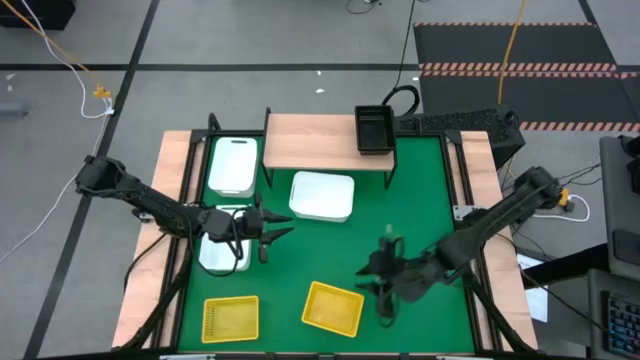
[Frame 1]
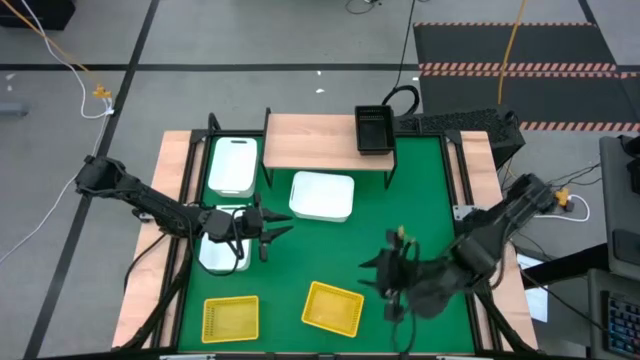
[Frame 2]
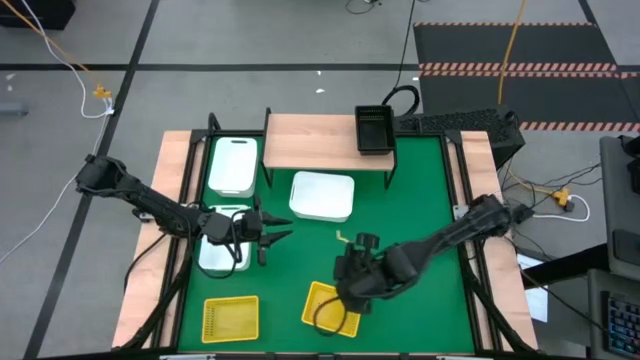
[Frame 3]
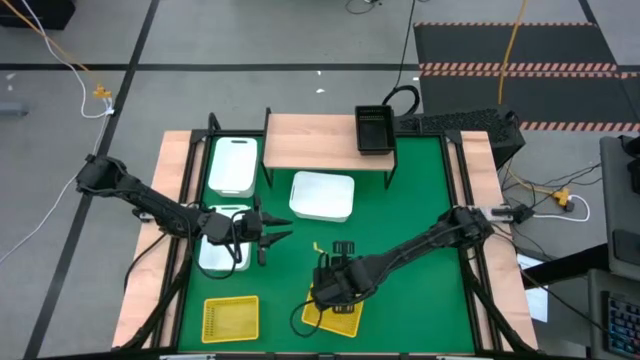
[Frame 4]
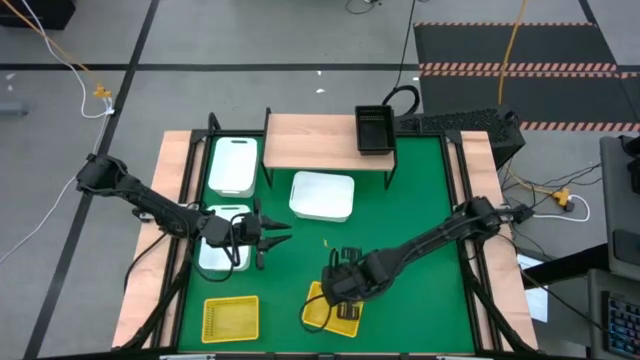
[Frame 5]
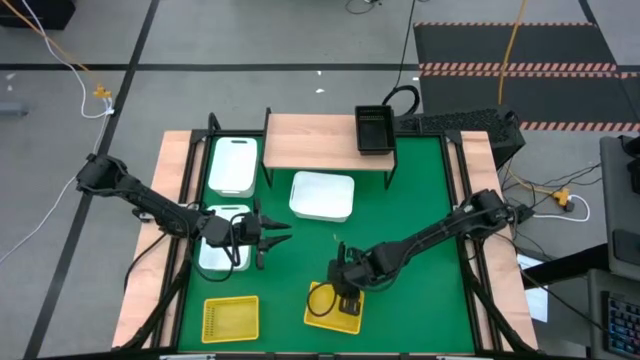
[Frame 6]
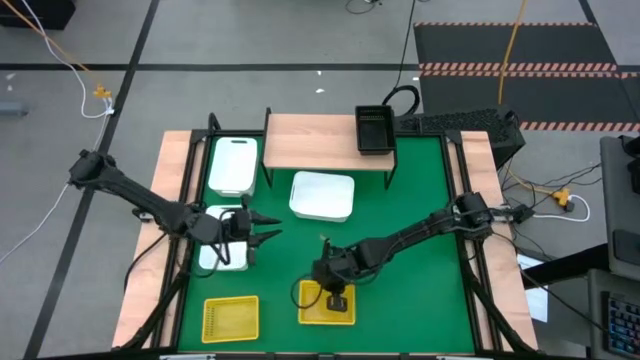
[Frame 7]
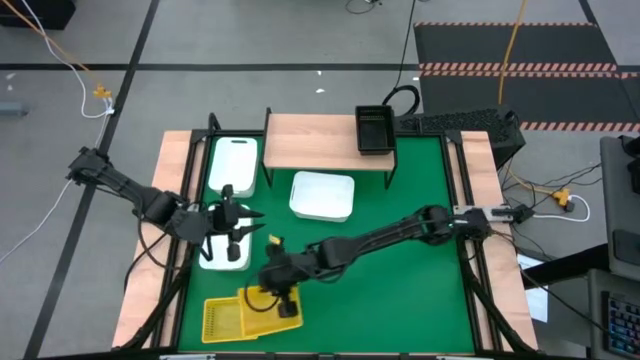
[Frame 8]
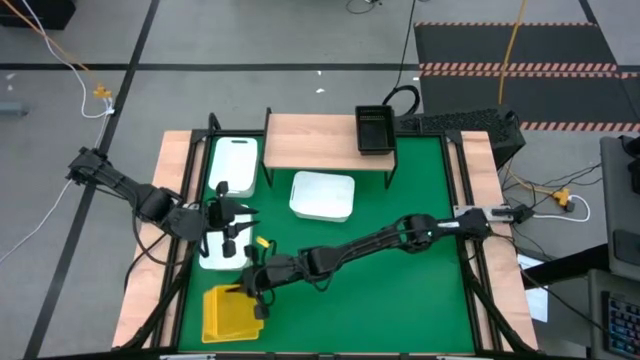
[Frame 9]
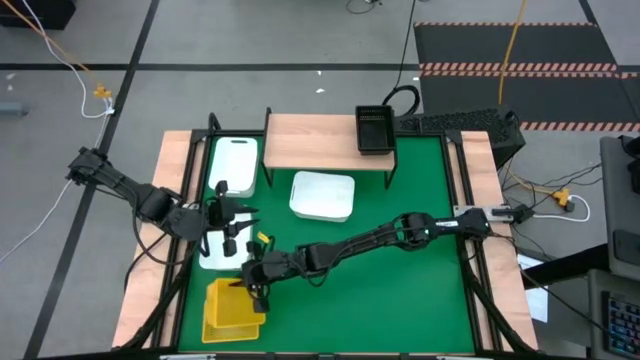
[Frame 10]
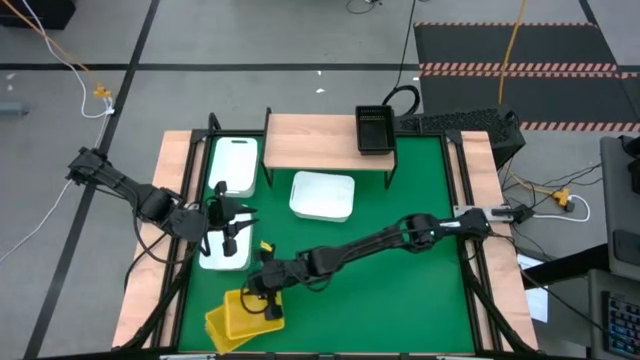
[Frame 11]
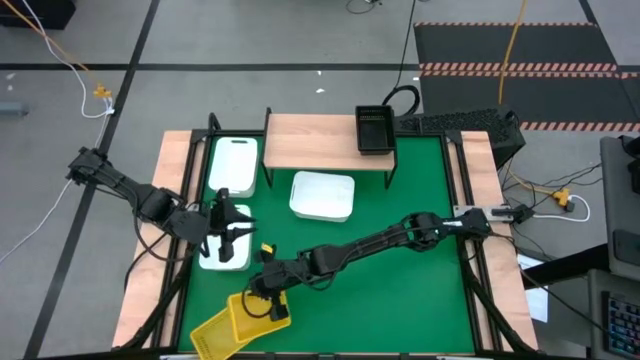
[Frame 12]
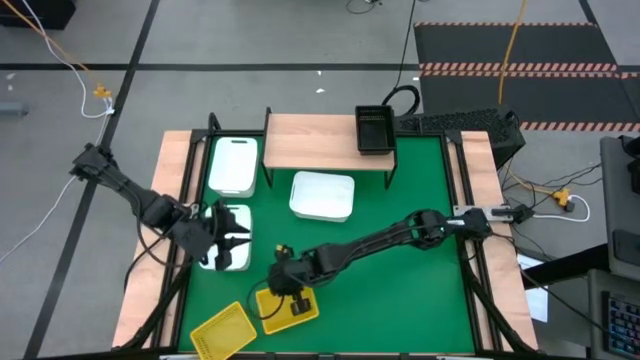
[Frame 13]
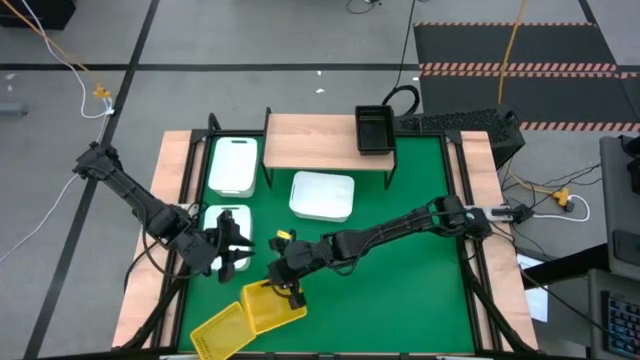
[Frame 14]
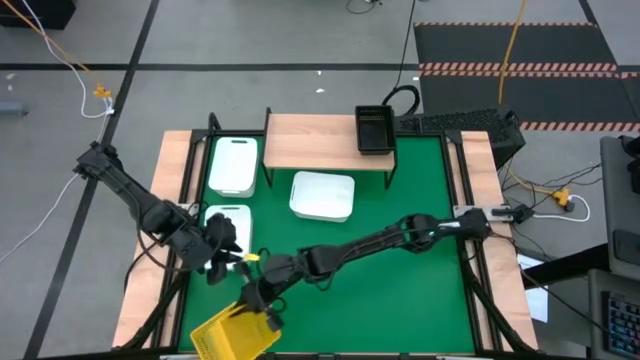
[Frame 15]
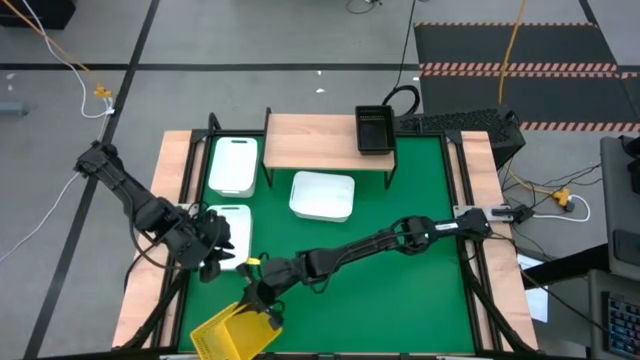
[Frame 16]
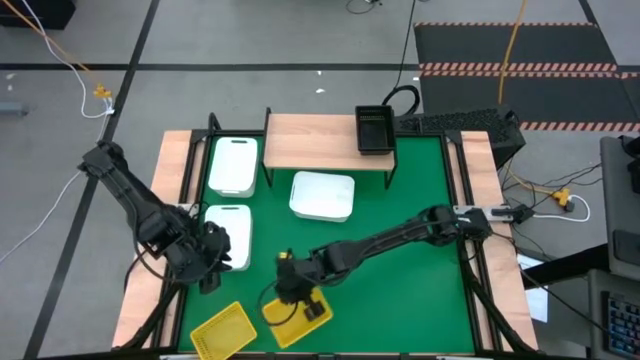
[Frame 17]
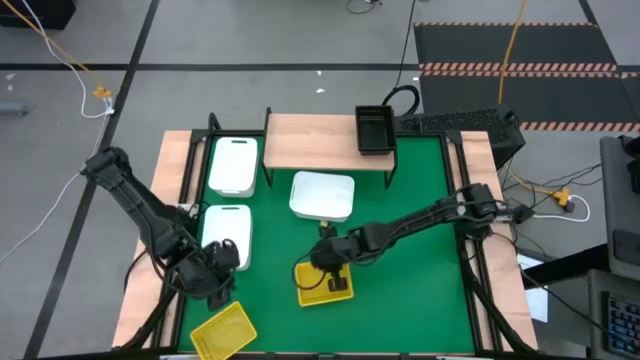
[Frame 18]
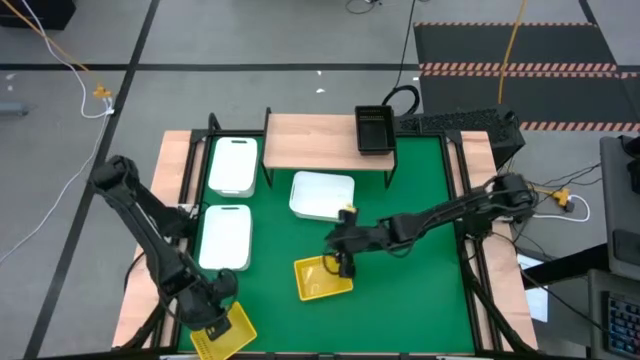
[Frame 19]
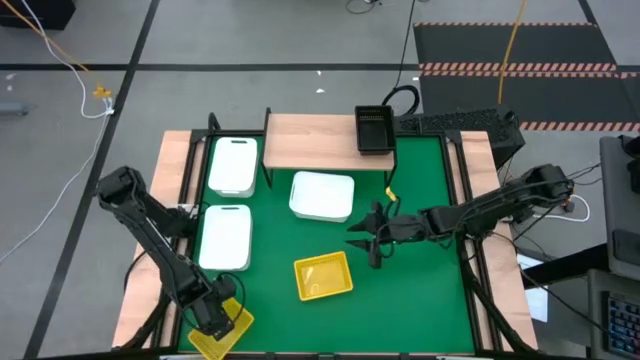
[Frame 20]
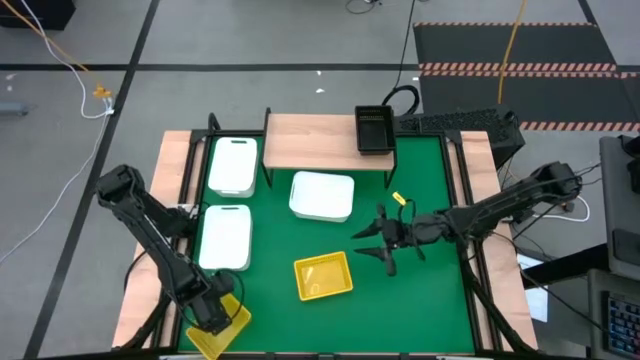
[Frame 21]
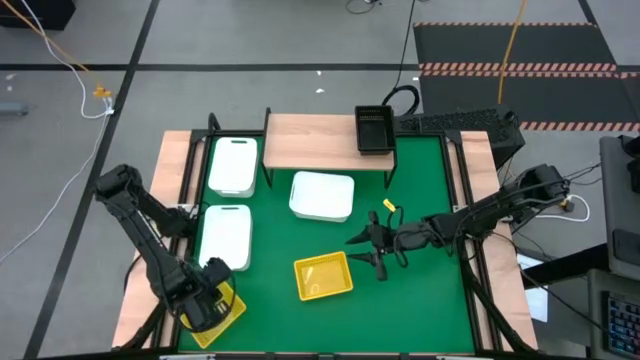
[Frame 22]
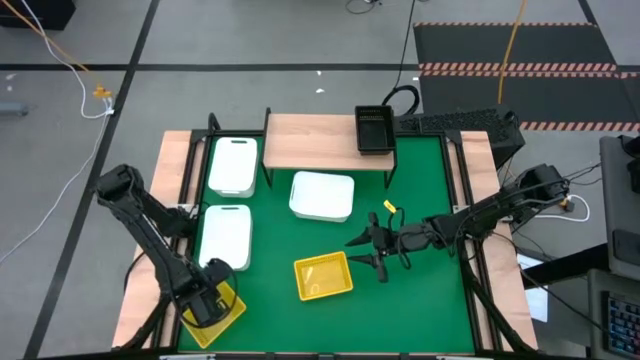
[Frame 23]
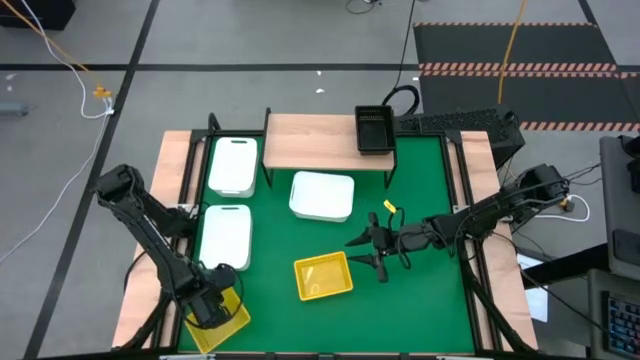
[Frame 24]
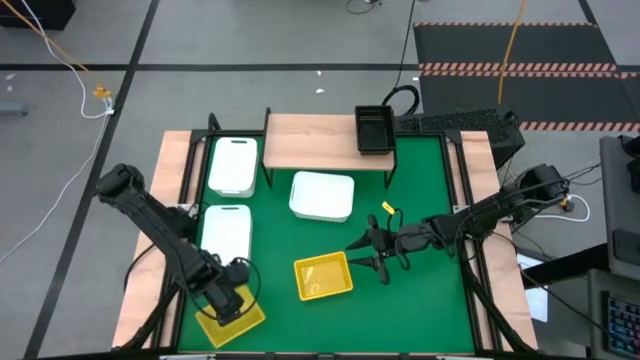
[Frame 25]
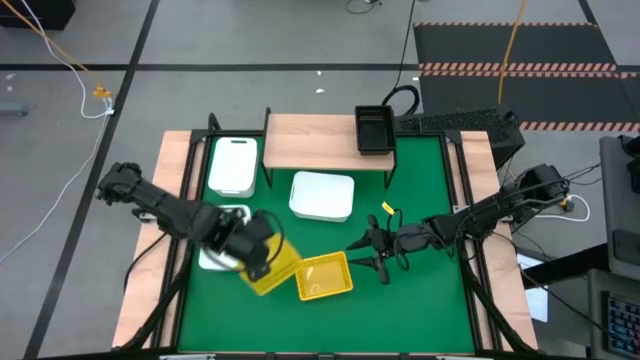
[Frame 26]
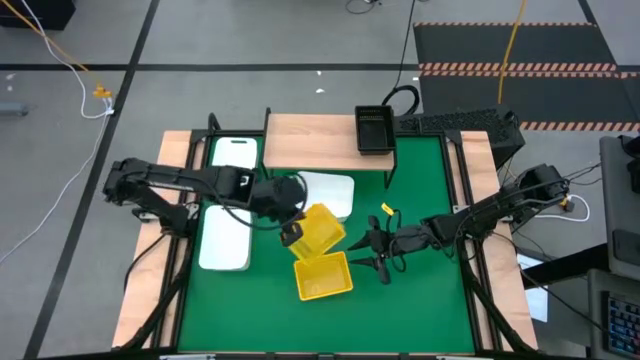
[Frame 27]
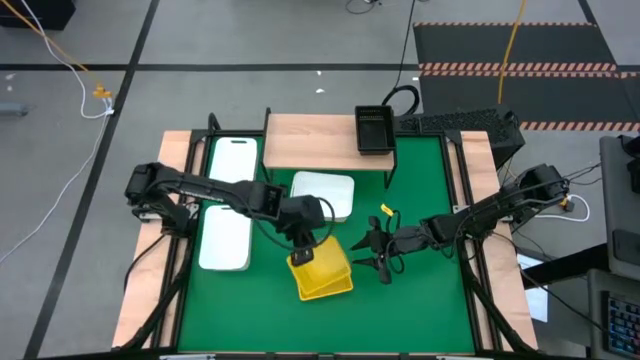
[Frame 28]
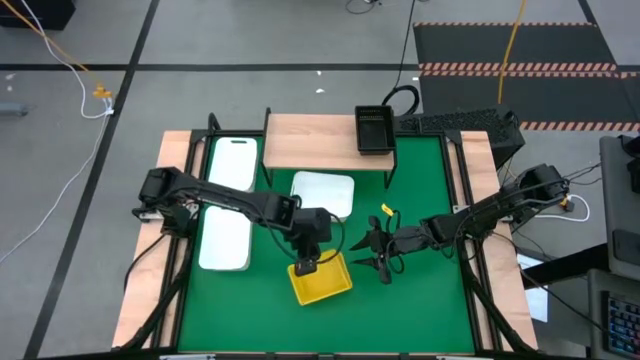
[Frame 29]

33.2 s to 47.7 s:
Task: Stack baskets on shelf by color
Stack the left yellow bin on the other yellow bins

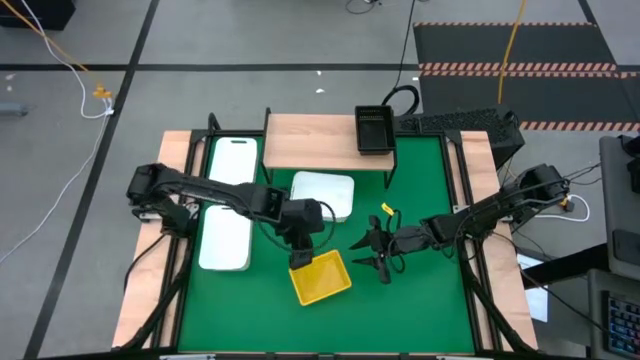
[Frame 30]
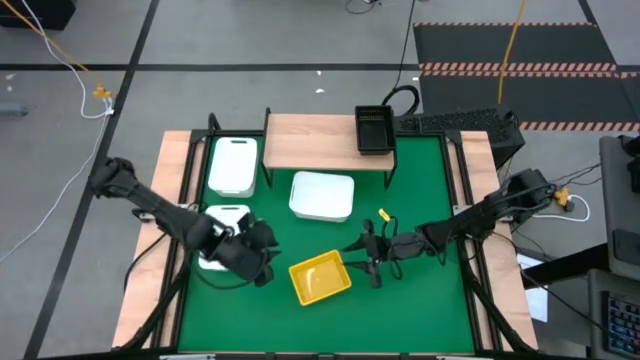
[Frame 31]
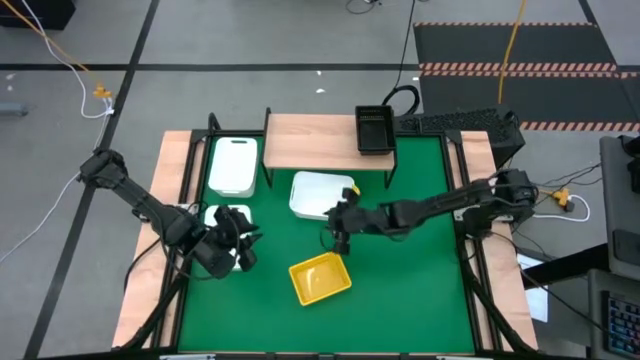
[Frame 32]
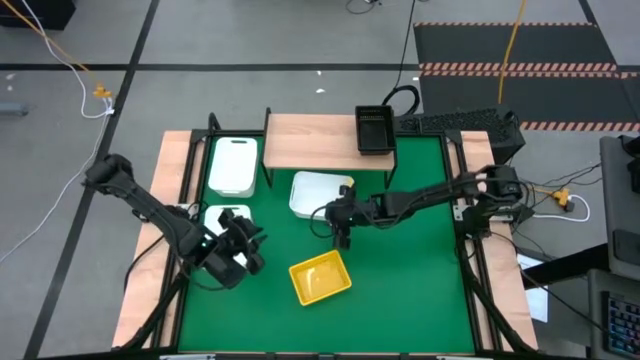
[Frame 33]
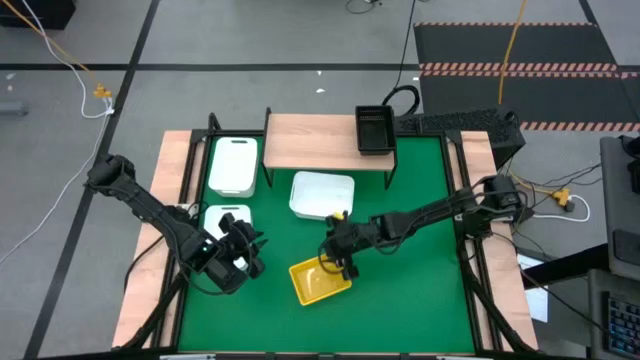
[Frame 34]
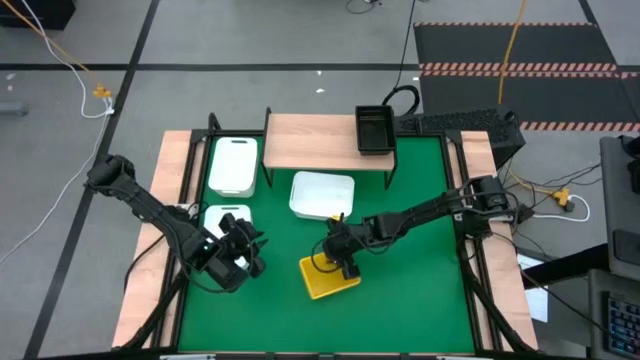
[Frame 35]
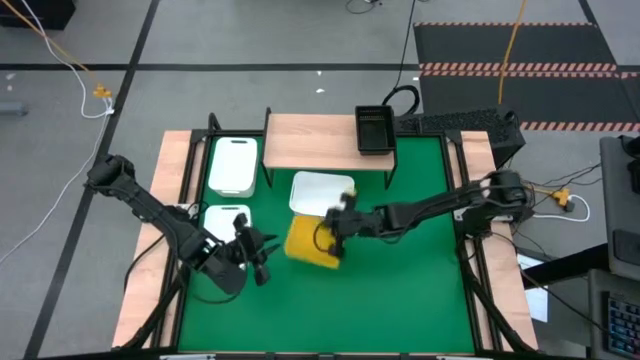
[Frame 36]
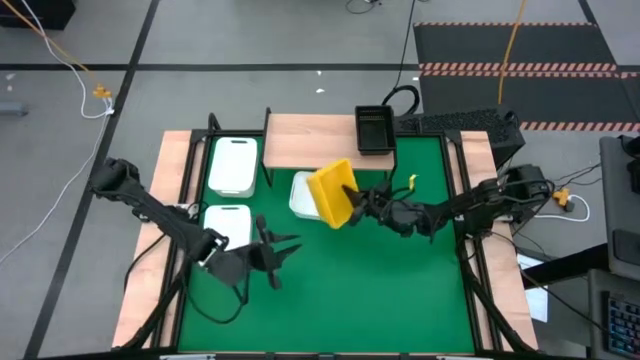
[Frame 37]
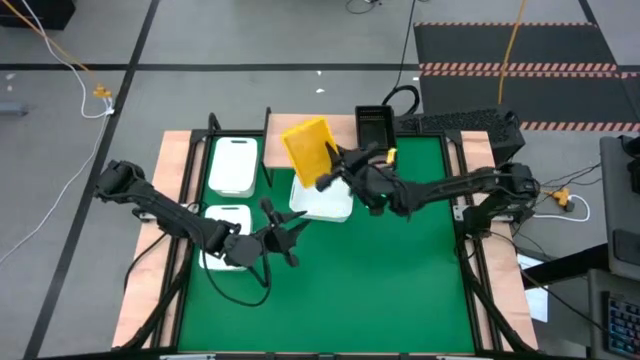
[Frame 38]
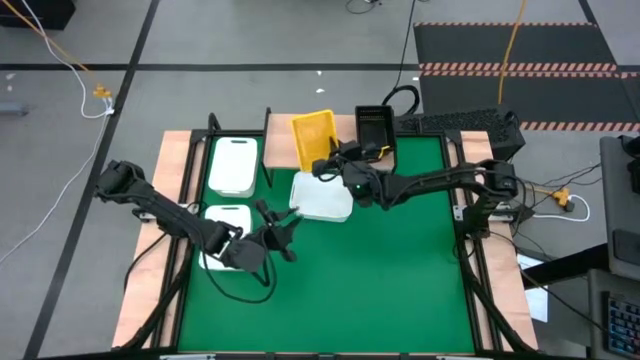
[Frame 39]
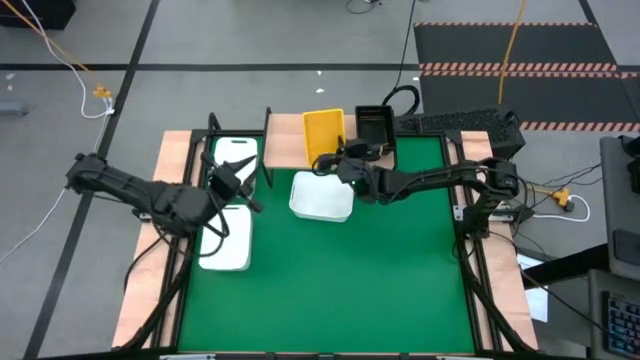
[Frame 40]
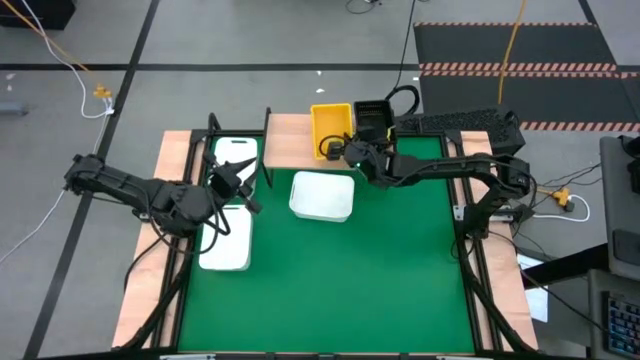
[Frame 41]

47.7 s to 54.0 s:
Put the stack of yellow bins on the shelf
